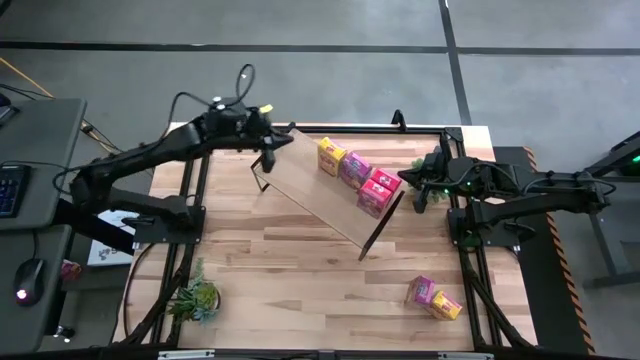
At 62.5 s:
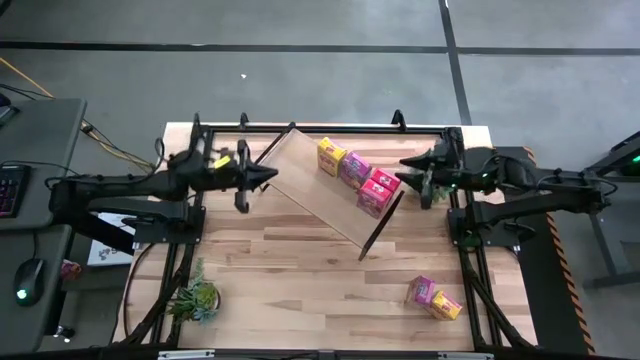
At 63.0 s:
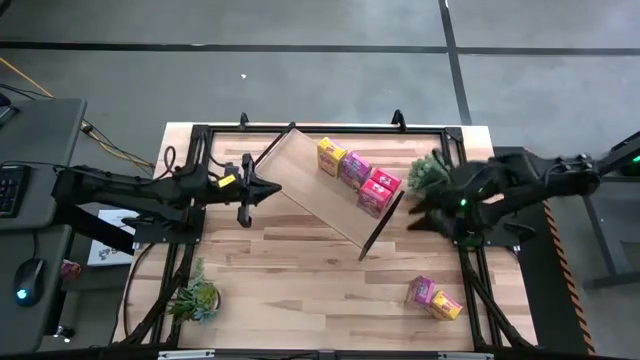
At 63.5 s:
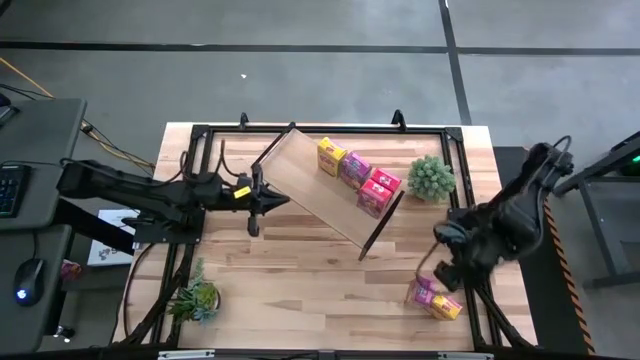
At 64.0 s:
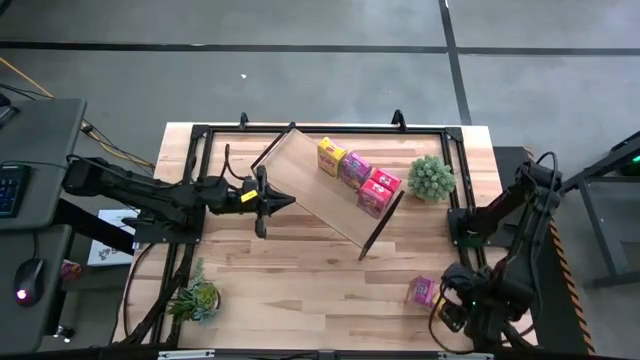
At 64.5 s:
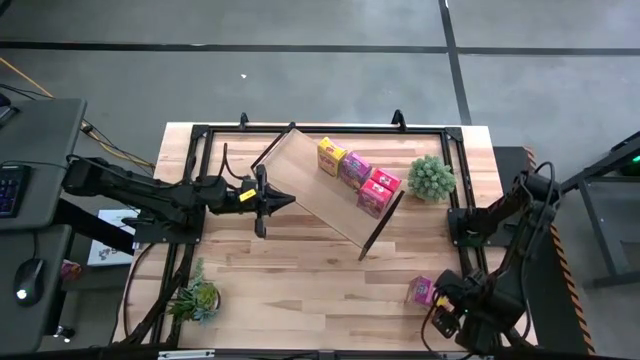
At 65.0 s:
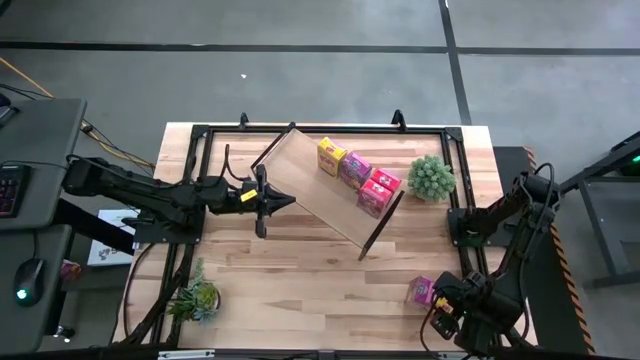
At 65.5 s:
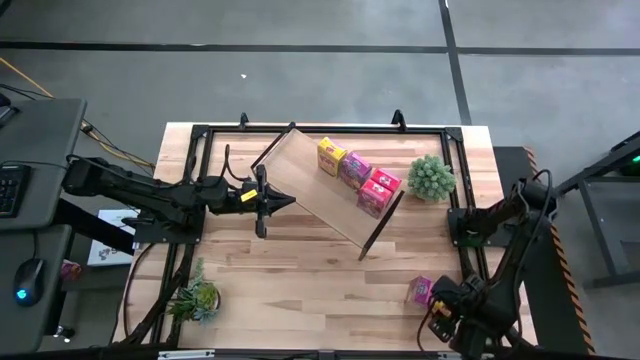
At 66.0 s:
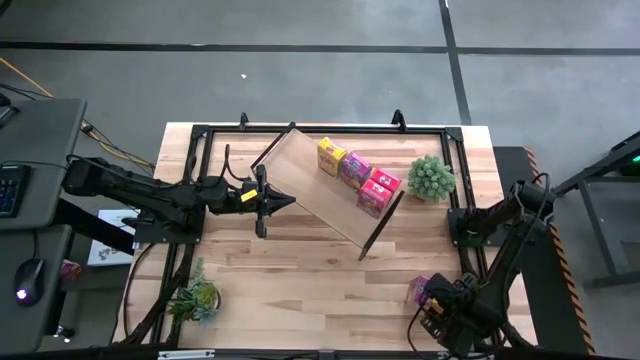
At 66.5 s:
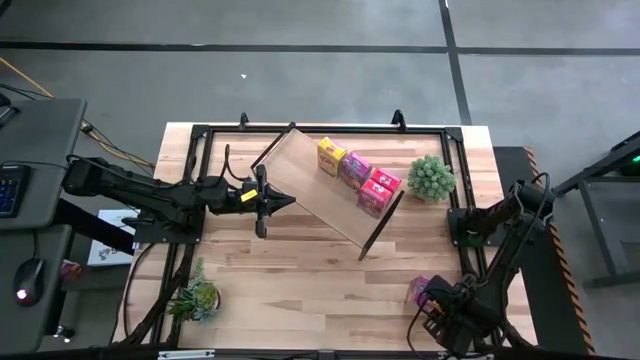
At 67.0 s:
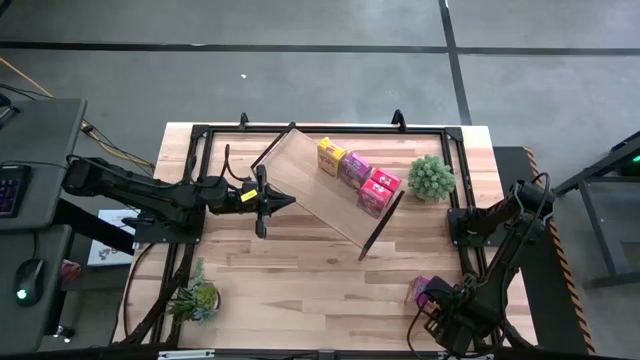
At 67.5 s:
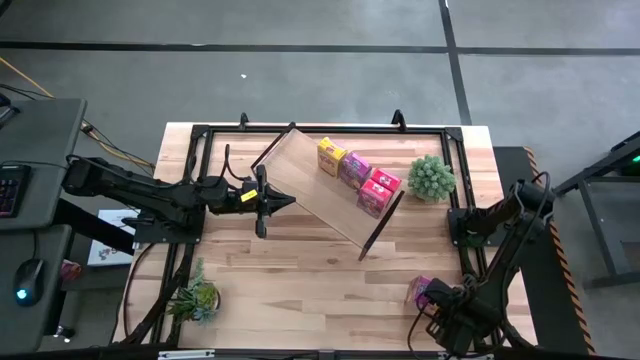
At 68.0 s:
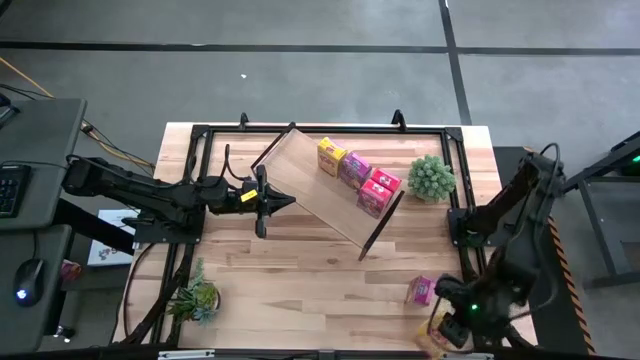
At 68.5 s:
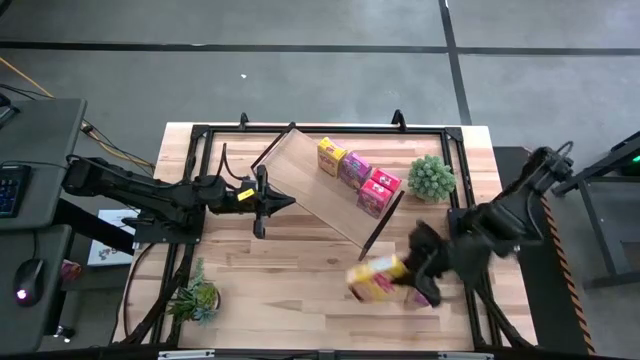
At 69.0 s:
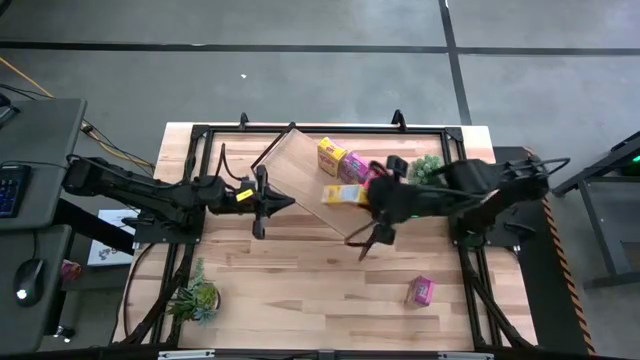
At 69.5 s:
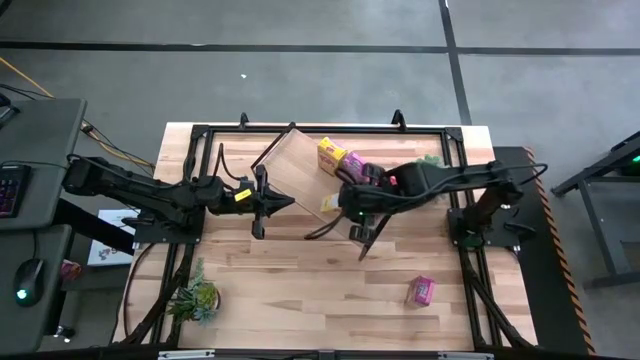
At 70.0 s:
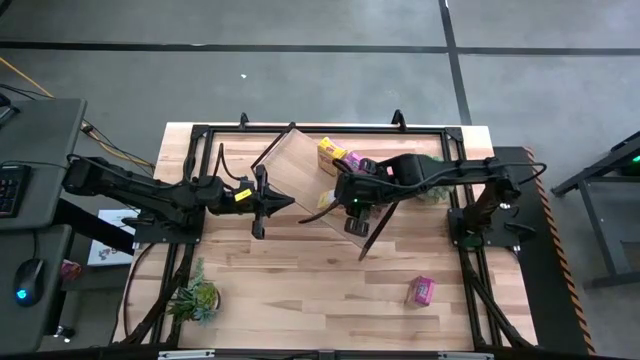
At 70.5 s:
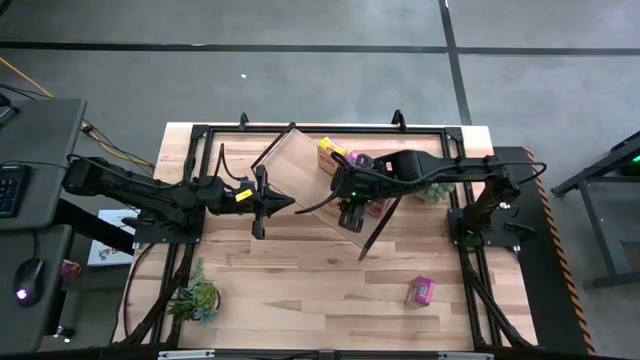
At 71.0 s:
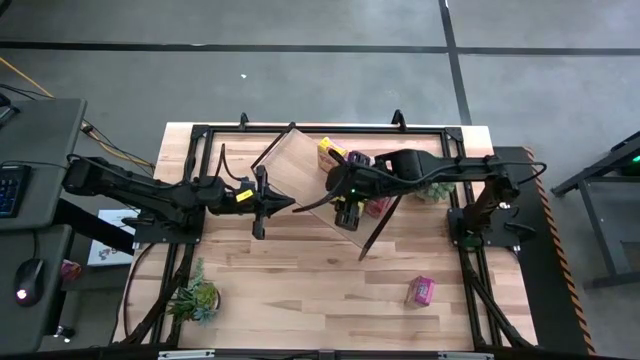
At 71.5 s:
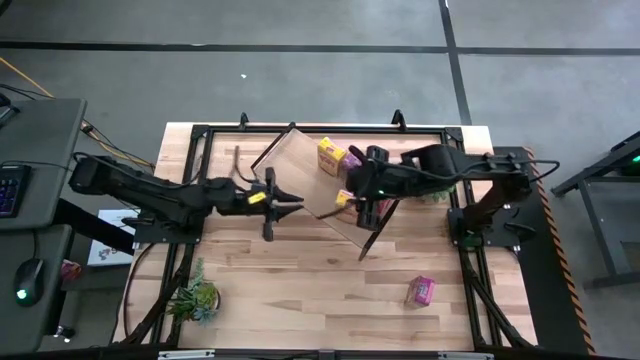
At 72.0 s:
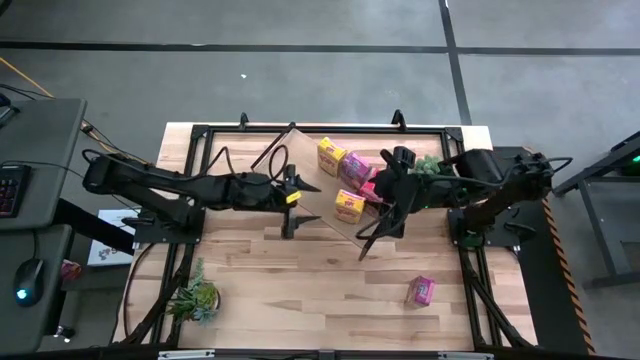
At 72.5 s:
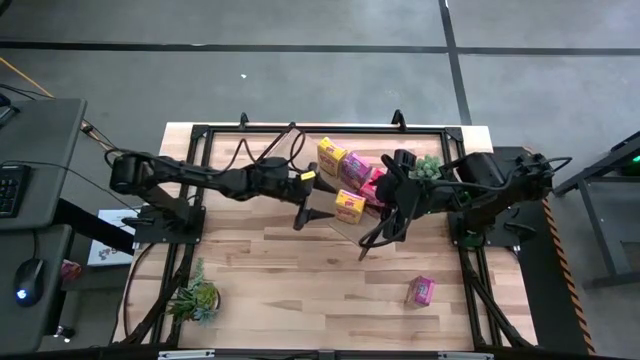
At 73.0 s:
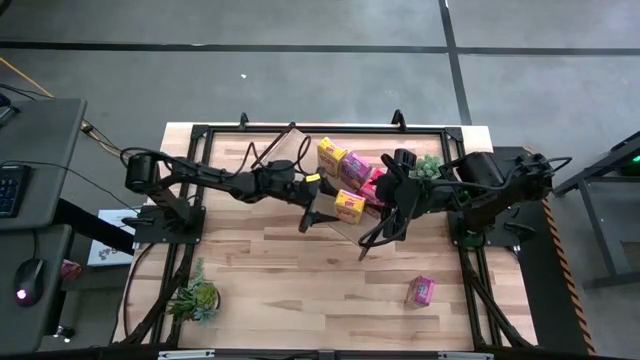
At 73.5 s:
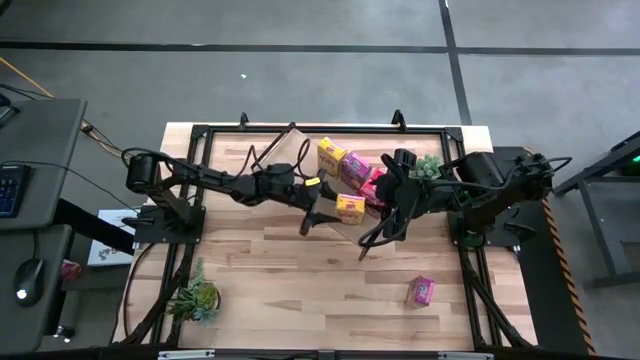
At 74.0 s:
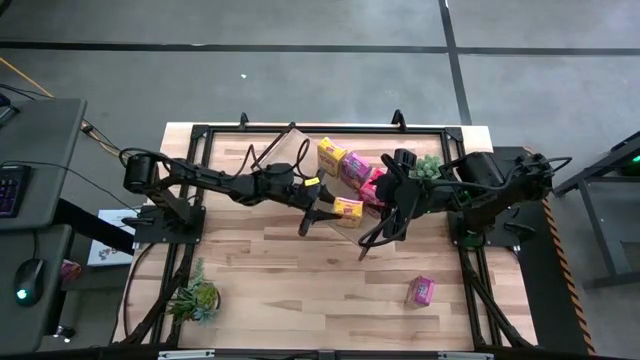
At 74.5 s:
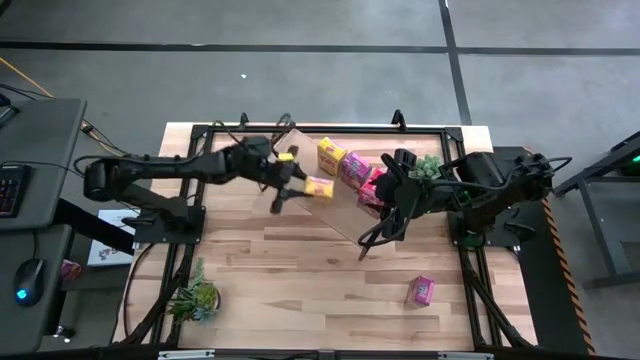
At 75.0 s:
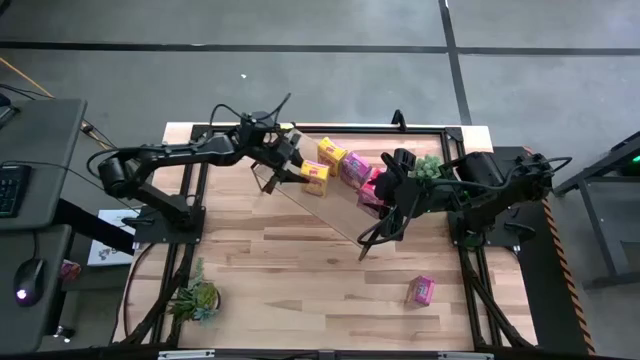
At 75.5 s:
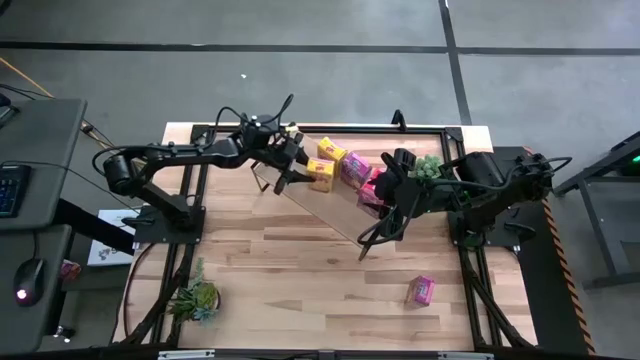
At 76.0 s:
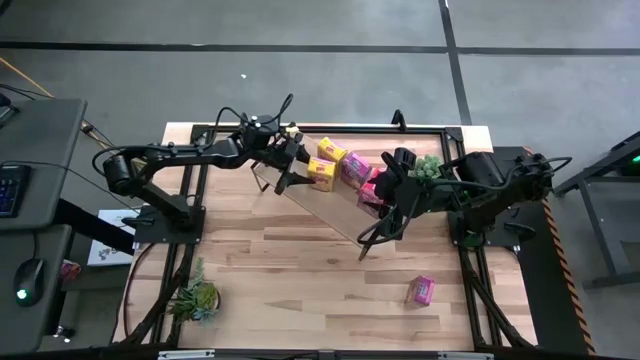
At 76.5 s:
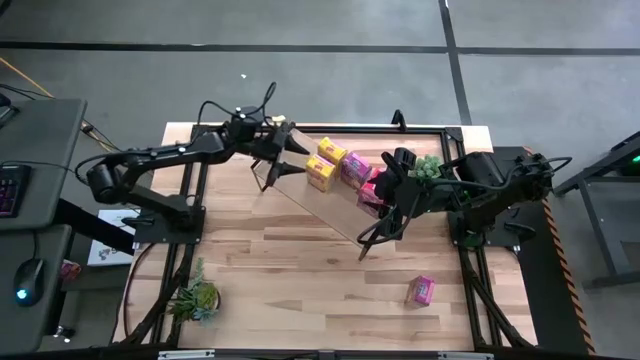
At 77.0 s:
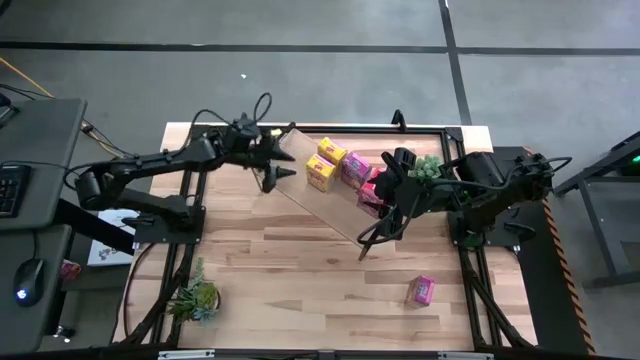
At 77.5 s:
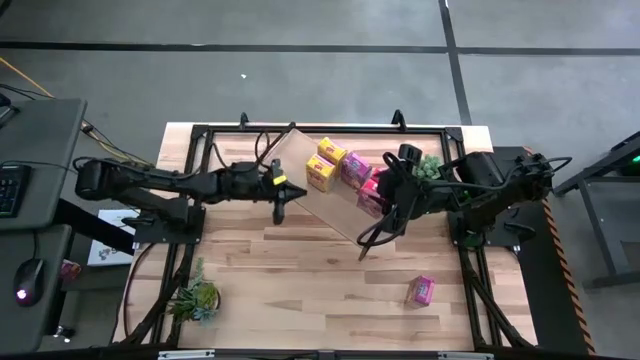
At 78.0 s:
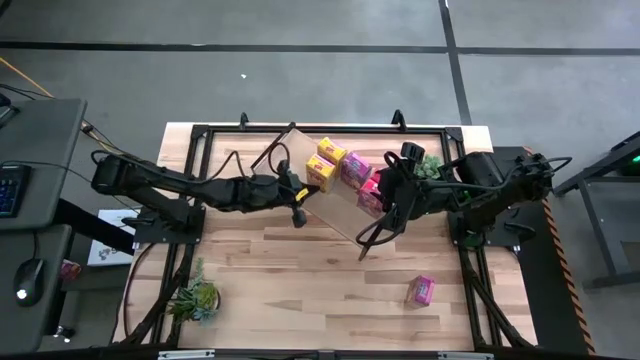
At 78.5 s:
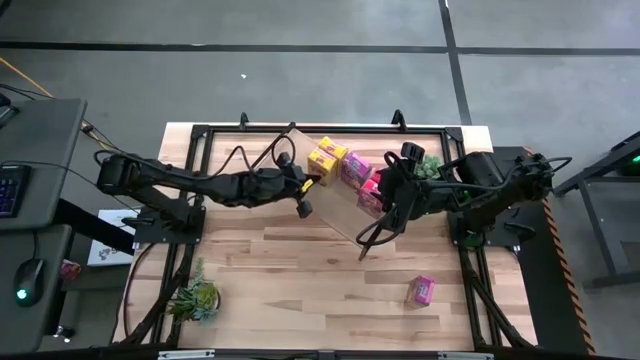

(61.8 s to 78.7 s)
Task: Stack cereal on shelf
Put the yellow cereal box on the shelf

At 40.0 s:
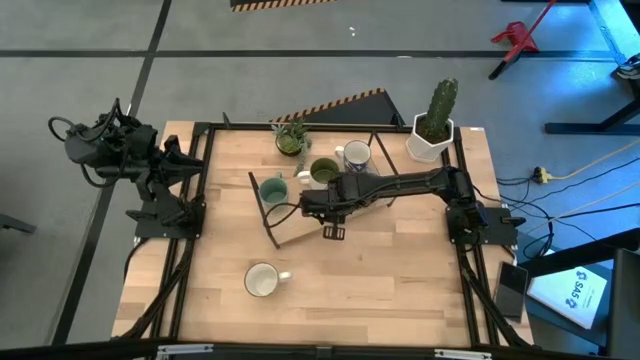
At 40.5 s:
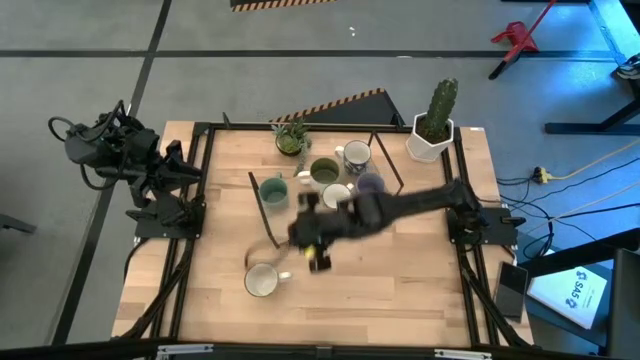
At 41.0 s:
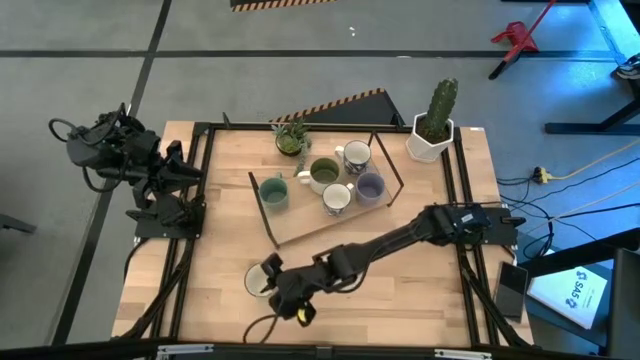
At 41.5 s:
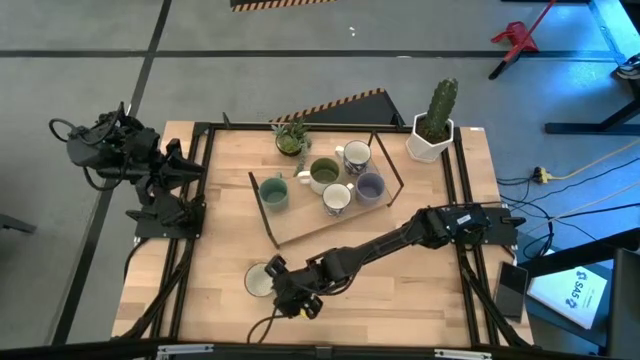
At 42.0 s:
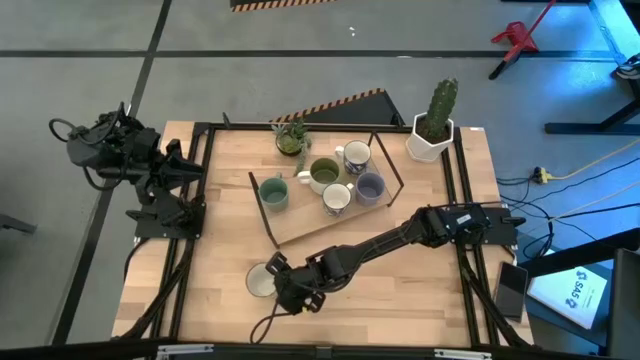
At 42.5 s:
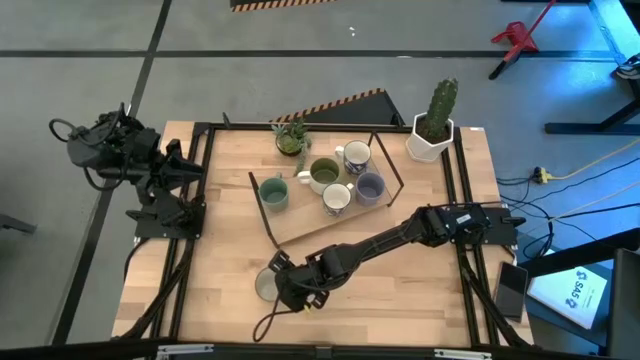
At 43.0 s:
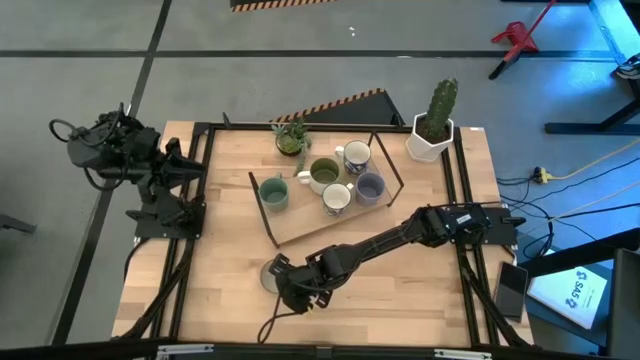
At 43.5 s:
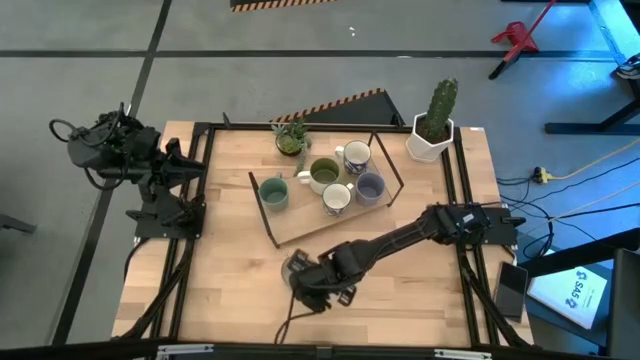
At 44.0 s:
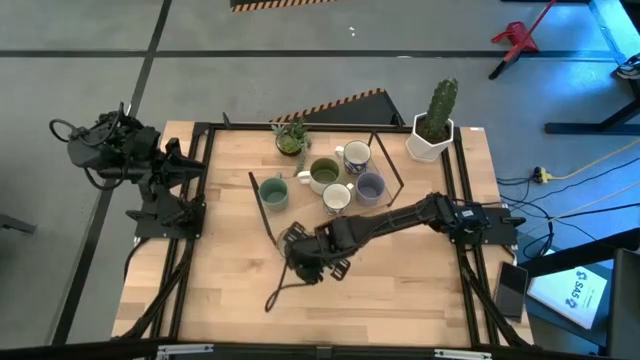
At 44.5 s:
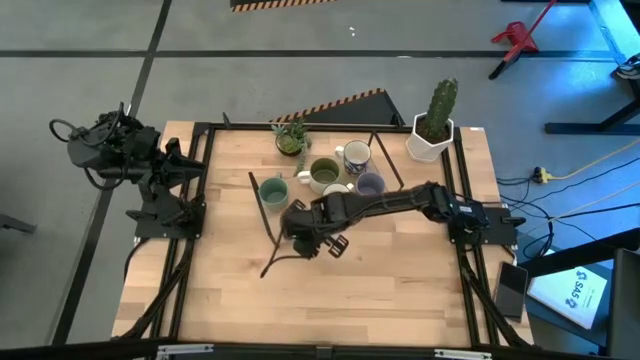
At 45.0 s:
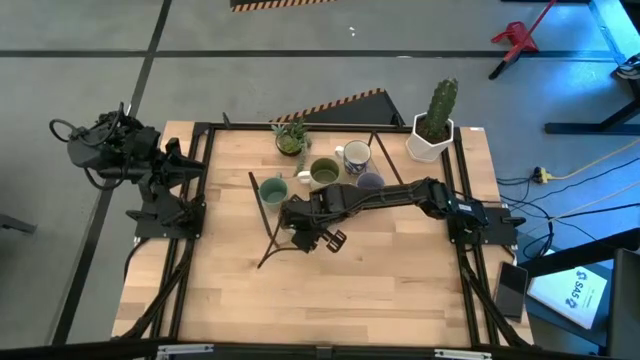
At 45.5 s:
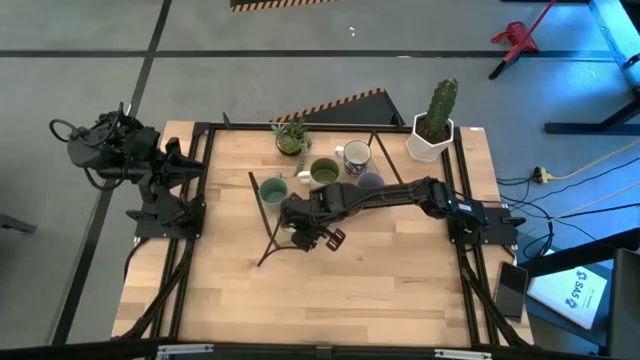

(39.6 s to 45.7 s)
Task: Place coffee mugs
Put the yellow mug on the shelf
